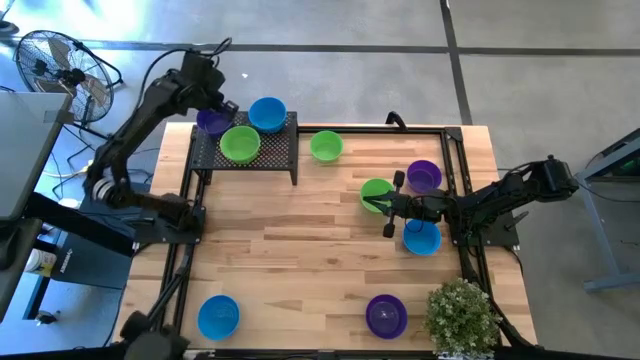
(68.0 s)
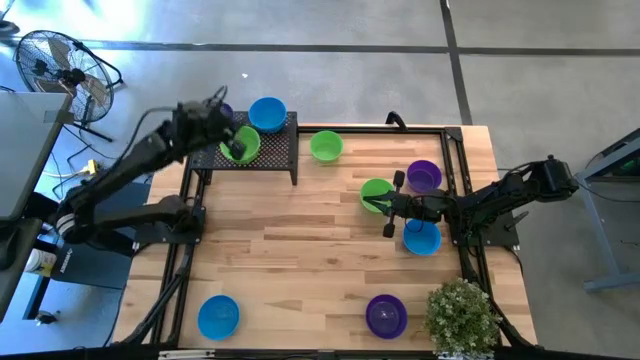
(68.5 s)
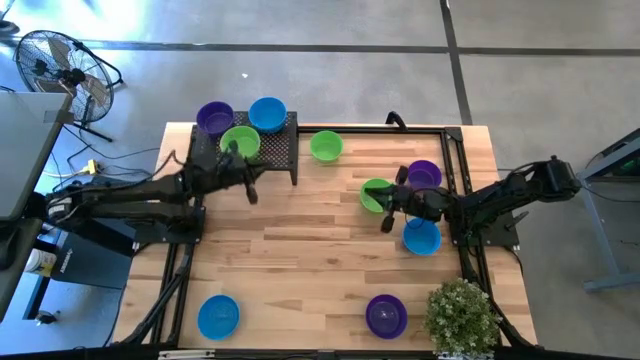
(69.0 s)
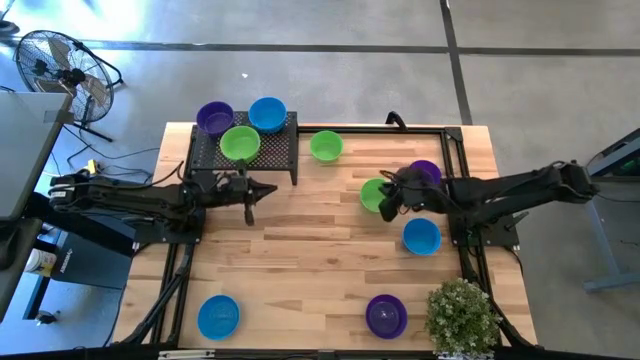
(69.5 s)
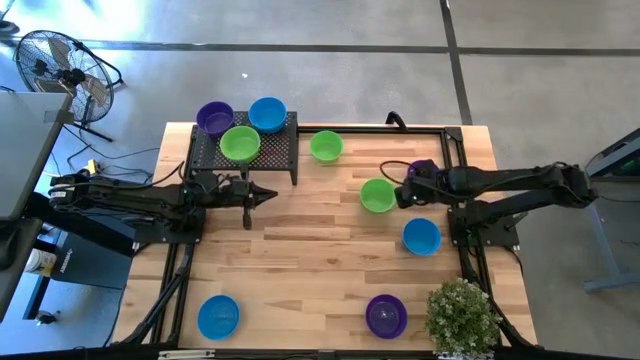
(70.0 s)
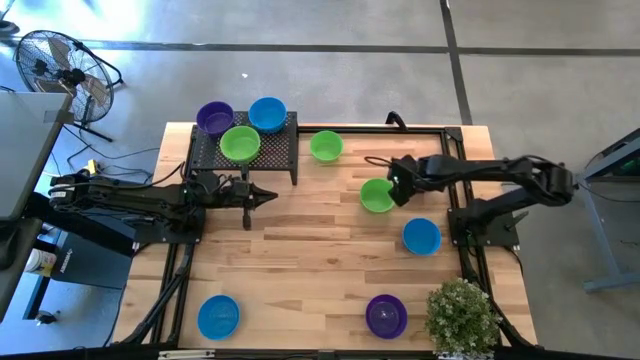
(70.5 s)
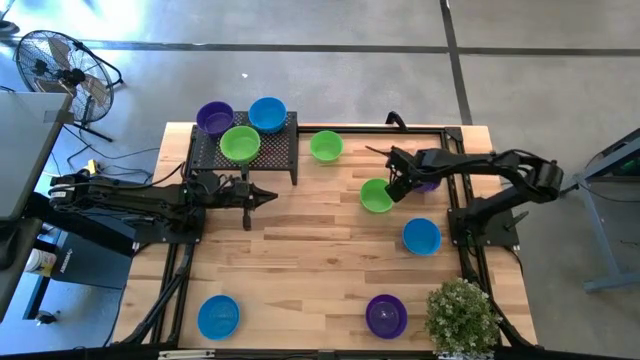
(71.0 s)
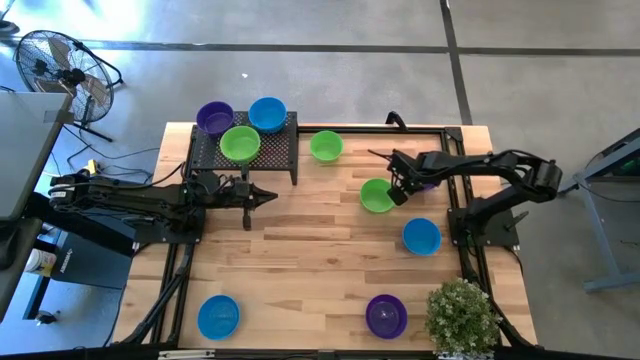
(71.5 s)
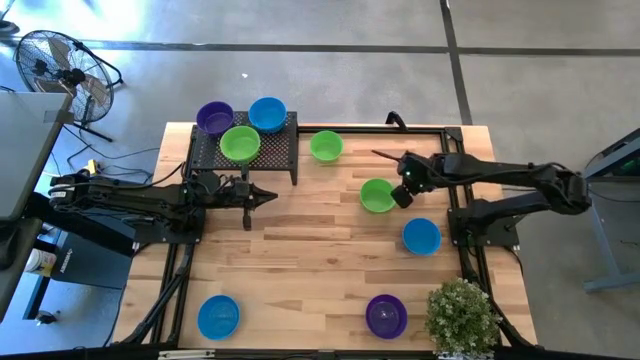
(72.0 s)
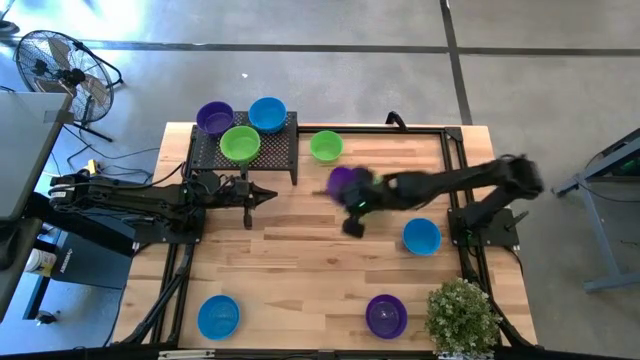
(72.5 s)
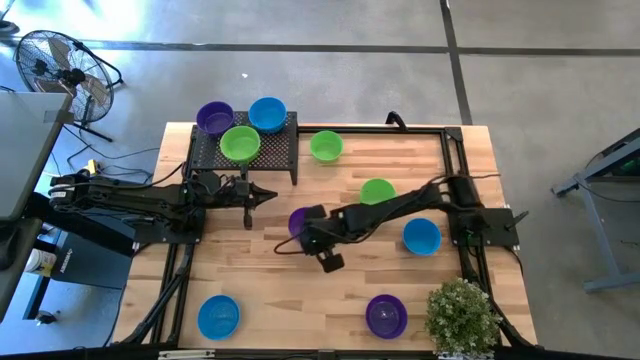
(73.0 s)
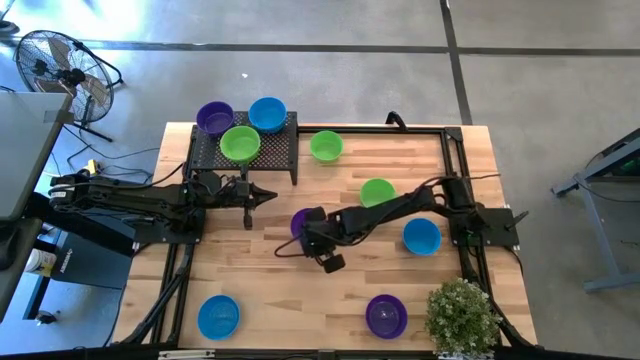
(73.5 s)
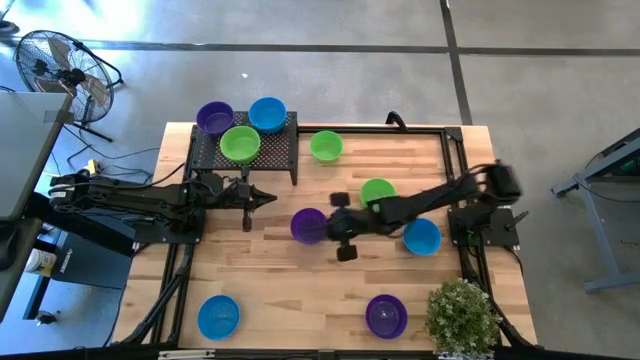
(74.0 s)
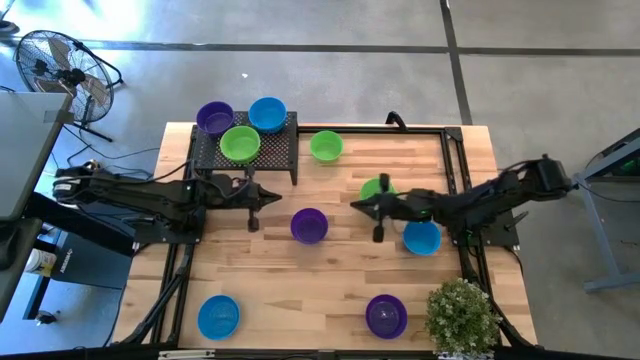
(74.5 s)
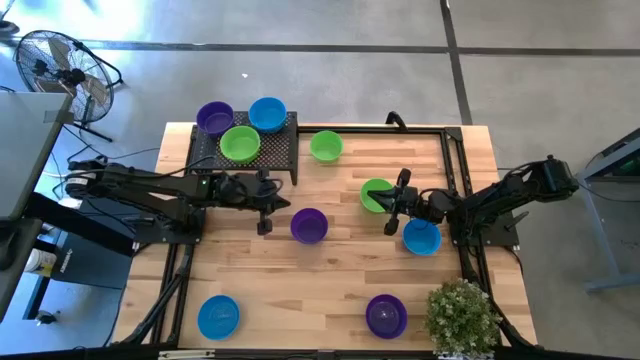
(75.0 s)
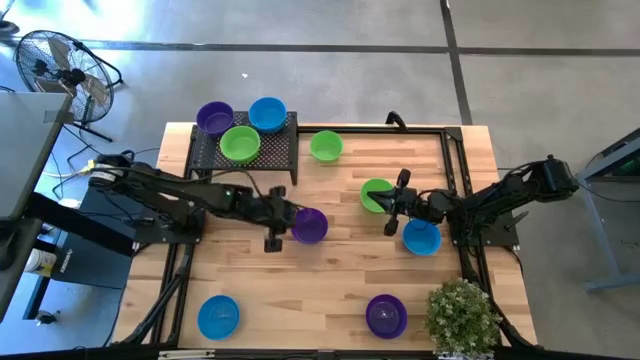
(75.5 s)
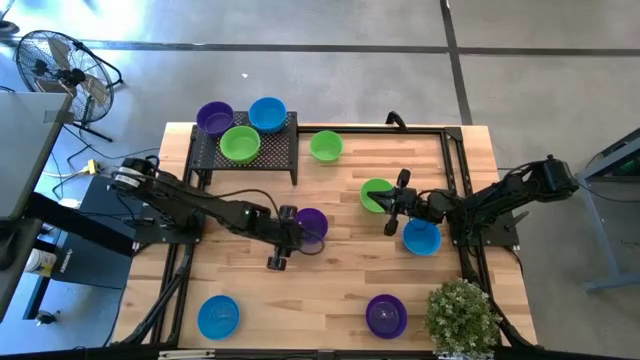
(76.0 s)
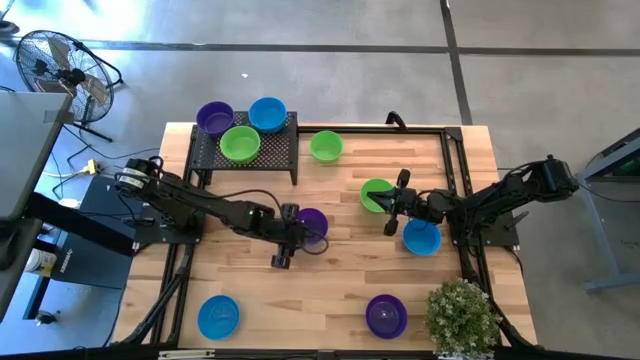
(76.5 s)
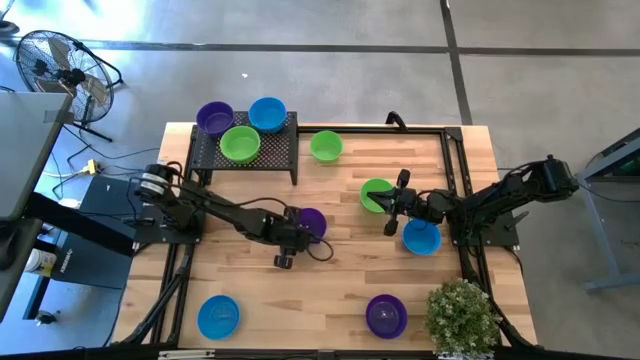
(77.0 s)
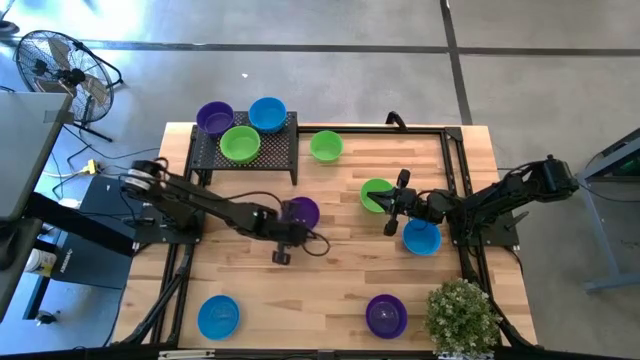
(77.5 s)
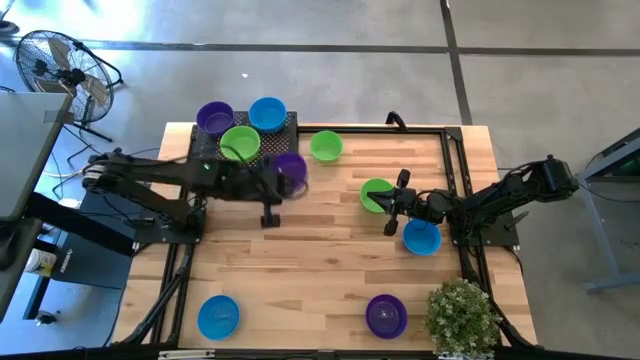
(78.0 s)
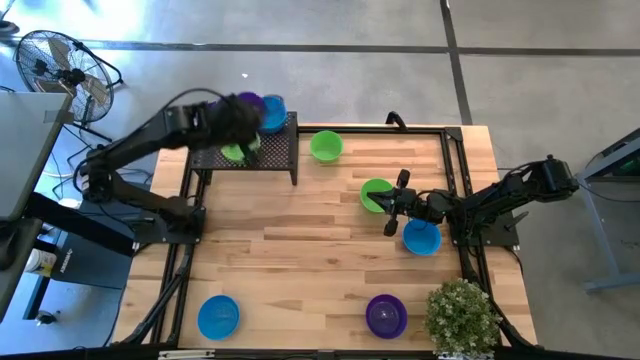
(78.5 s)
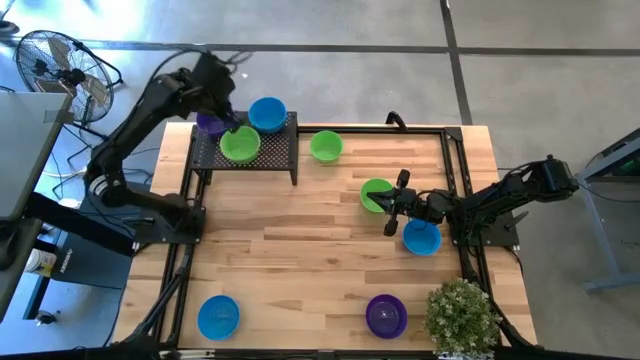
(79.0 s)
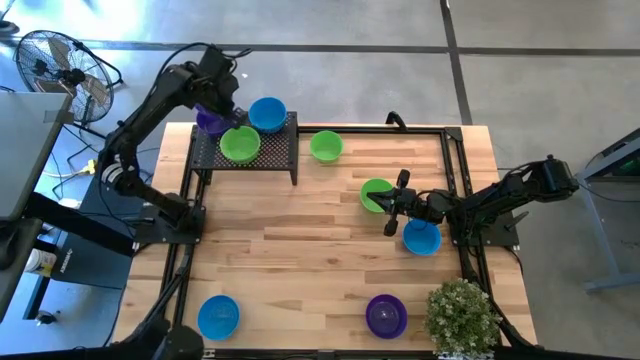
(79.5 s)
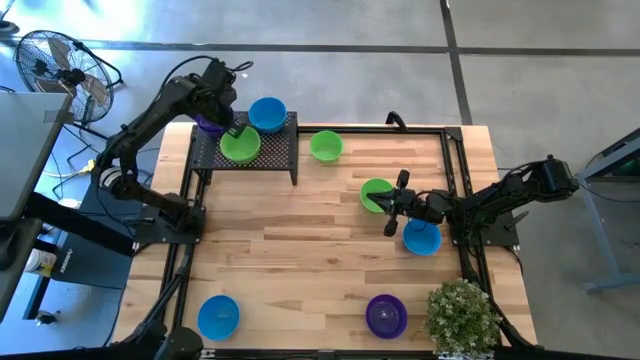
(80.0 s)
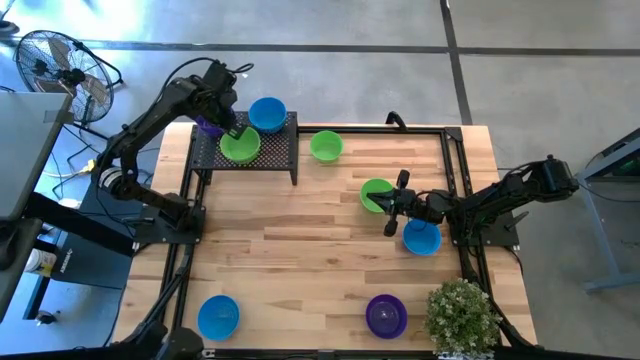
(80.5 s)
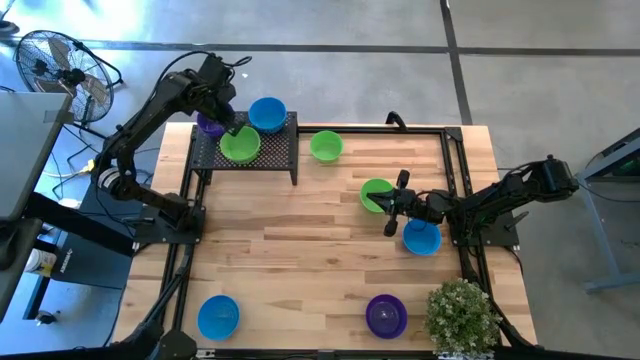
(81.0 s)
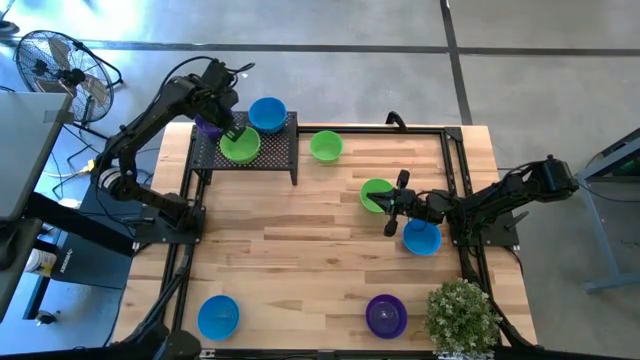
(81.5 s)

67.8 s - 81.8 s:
Task: Pick & Place Mini bowls
Stack the purple bowl on top of the purple bowl on the shelf

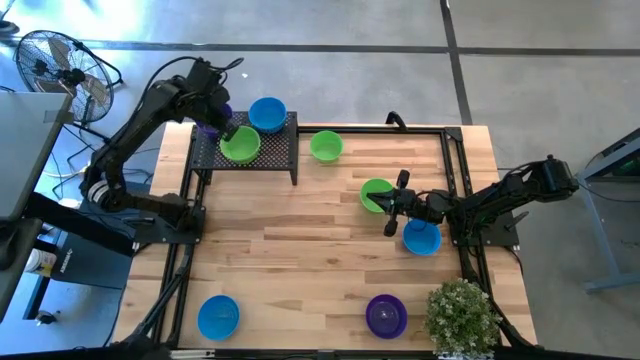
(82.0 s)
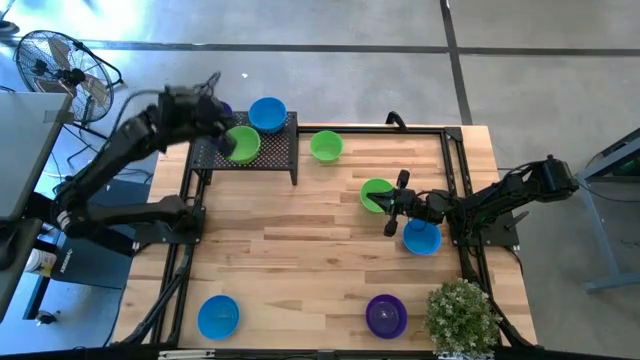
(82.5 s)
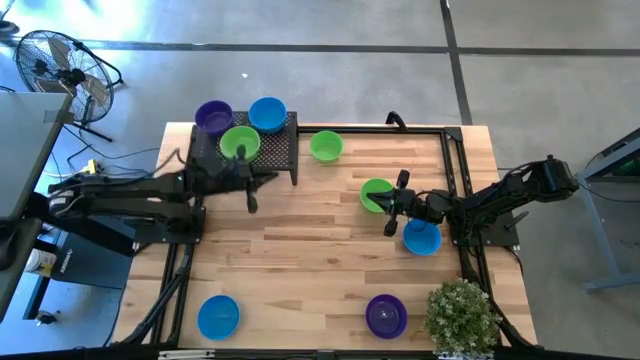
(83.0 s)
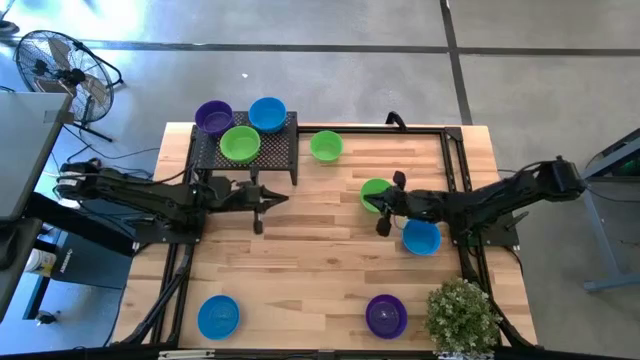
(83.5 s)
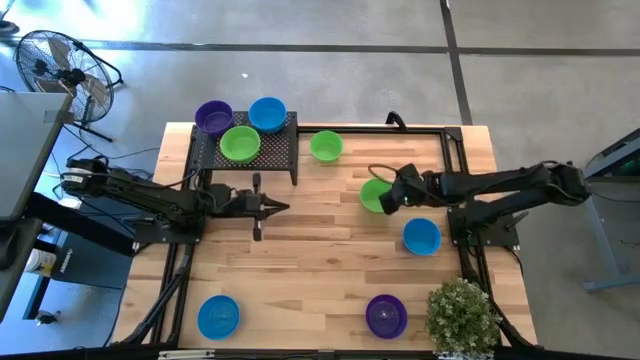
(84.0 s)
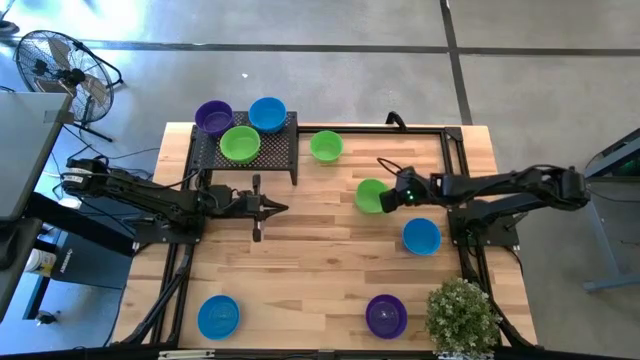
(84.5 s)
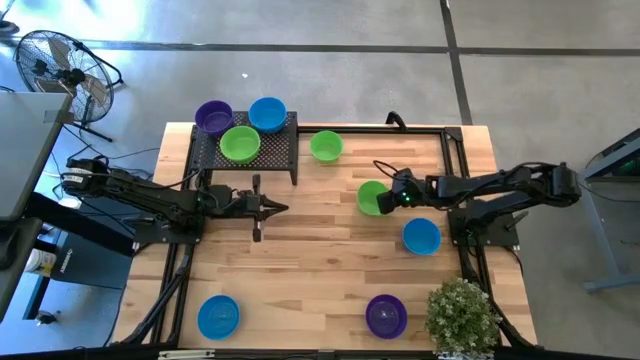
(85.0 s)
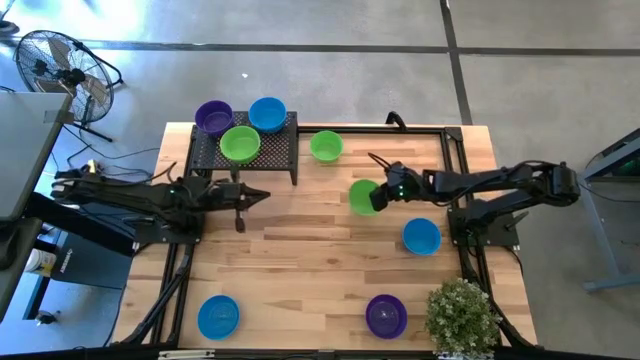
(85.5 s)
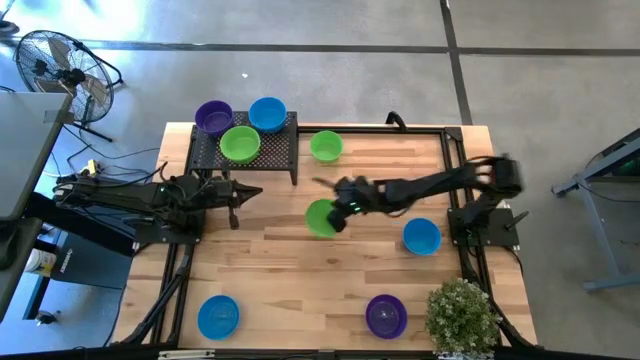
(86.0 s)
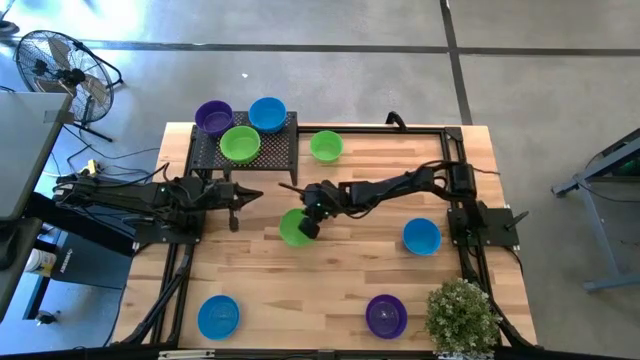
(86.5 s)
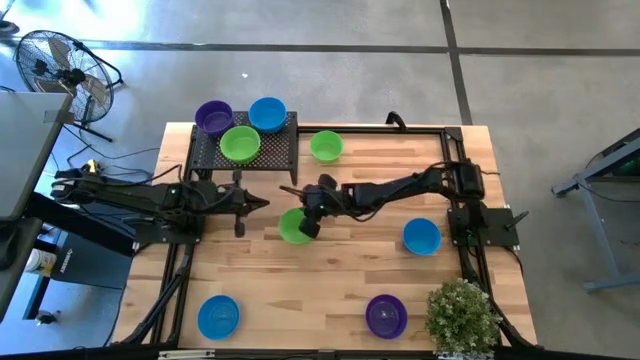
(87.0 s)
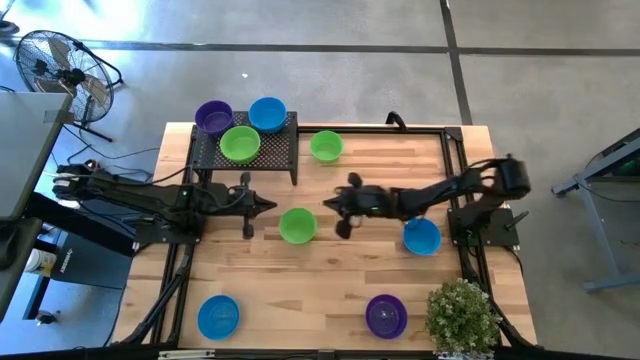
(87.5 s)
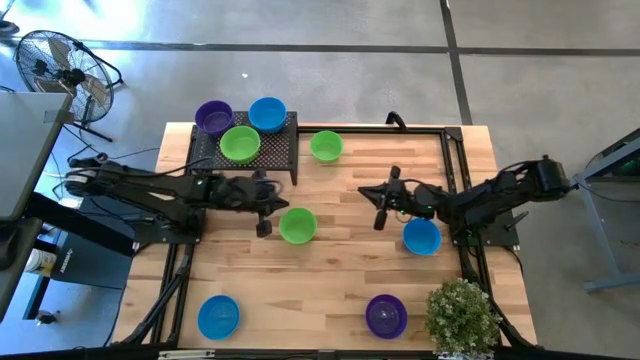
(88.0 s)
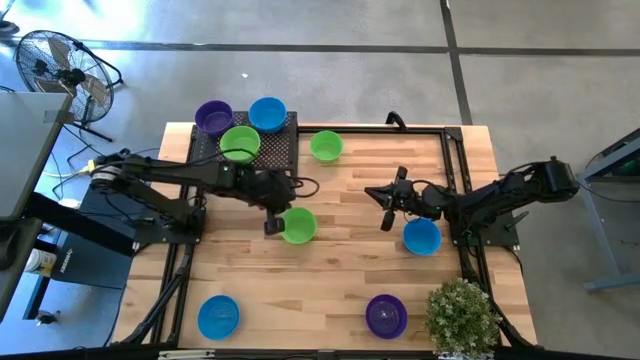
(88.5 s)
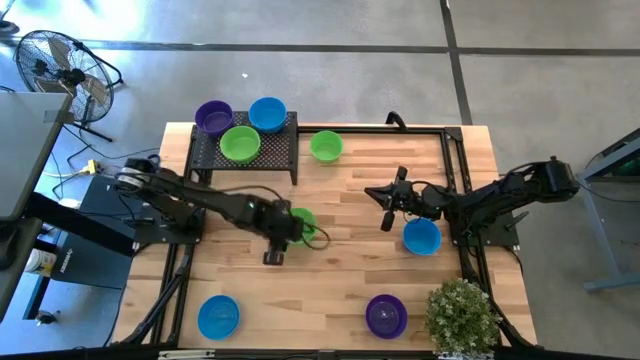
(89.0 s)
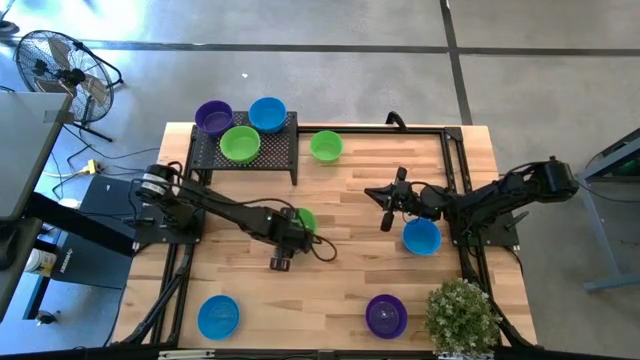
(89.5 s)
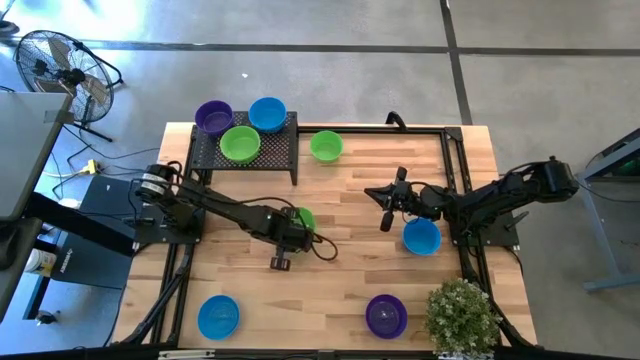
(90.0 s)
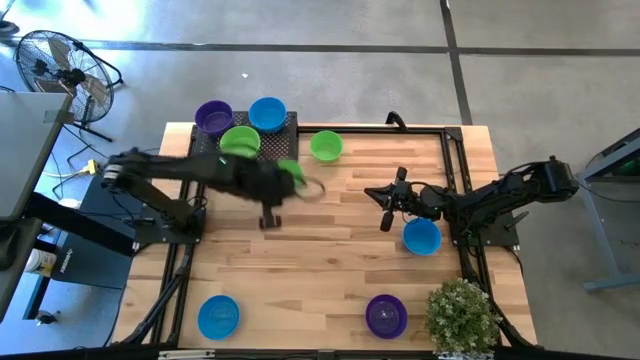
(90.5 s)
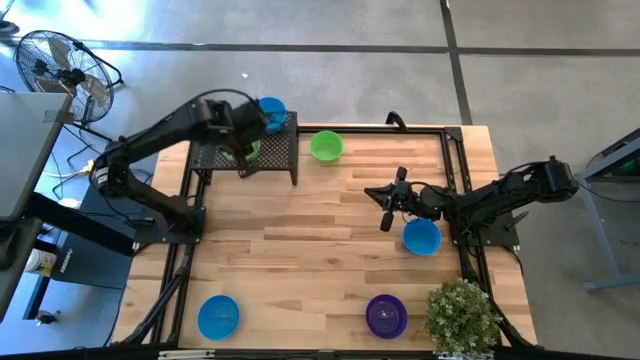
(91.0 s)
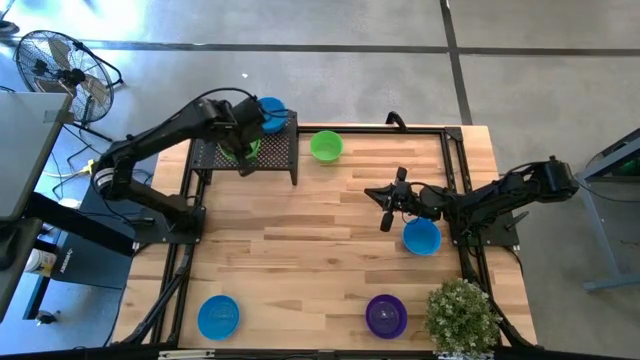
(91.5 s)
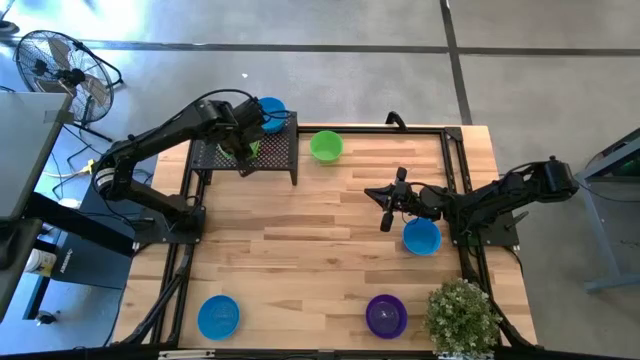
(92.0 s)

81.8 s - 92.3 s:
Stack the green bowl on top of the green bowl on the shelf
